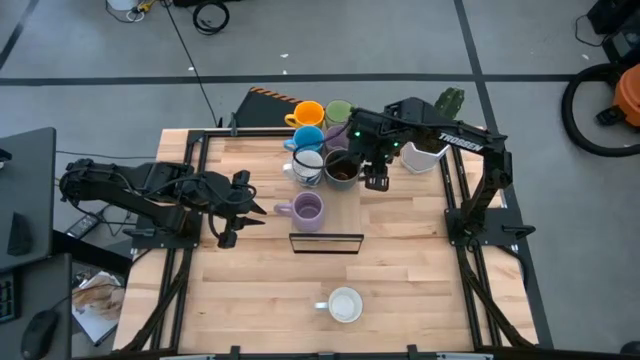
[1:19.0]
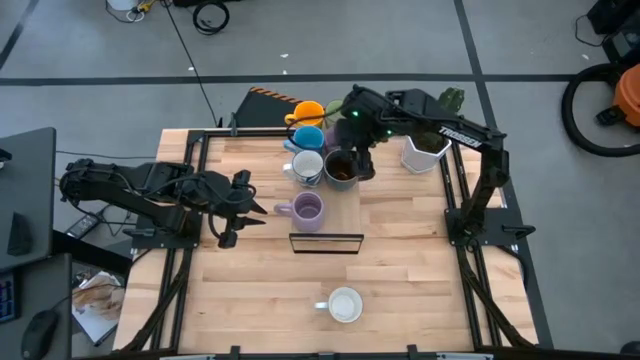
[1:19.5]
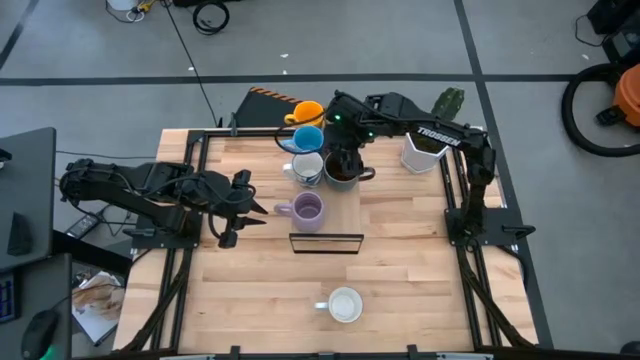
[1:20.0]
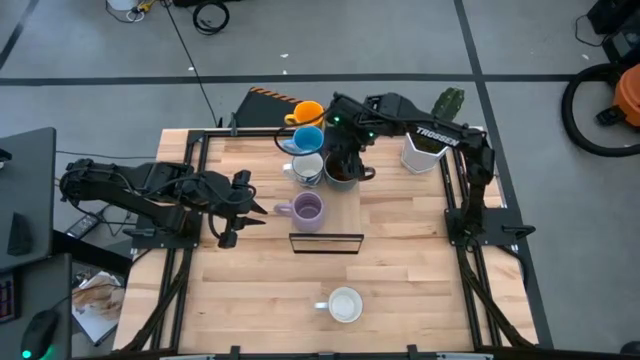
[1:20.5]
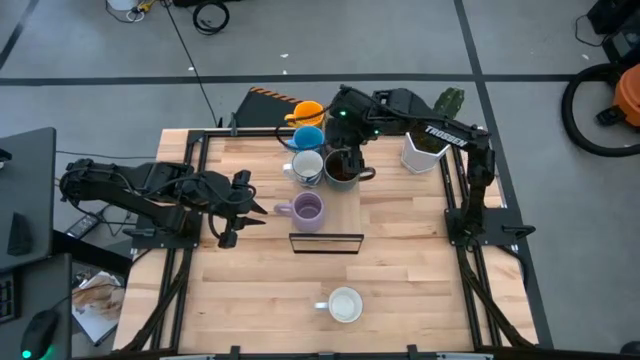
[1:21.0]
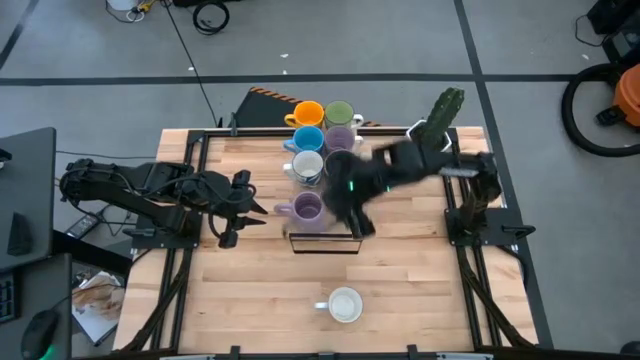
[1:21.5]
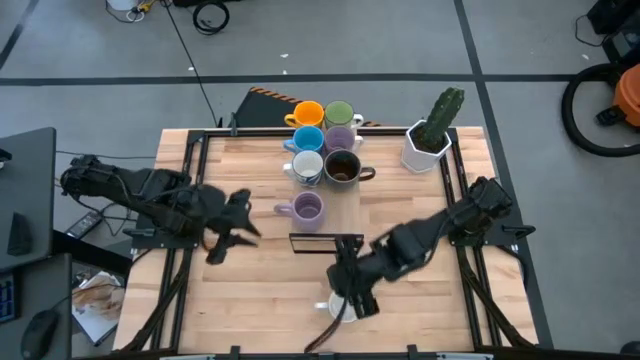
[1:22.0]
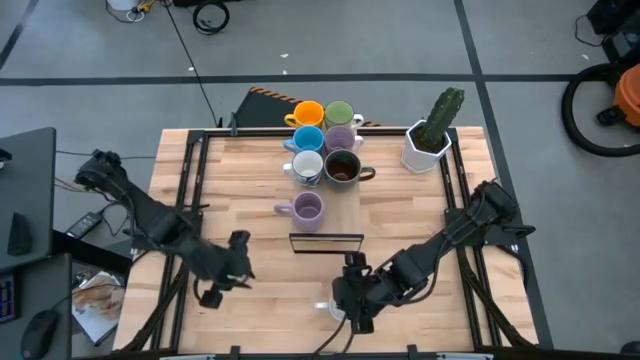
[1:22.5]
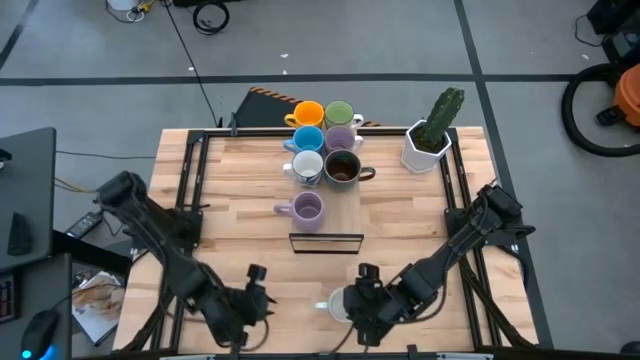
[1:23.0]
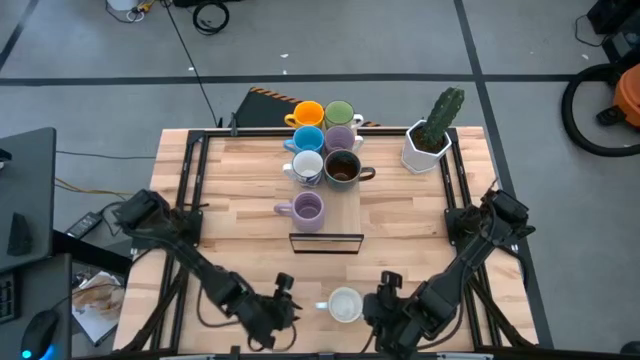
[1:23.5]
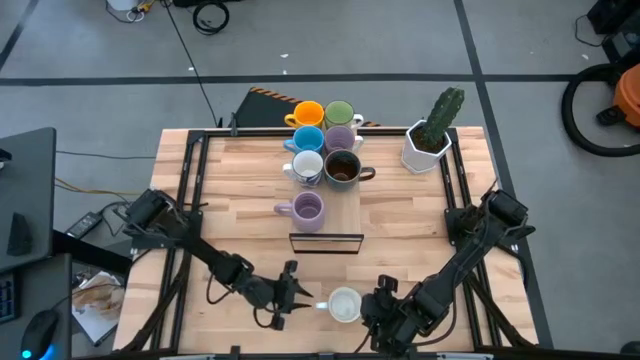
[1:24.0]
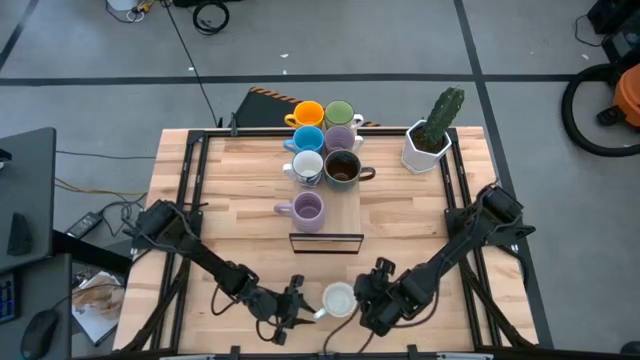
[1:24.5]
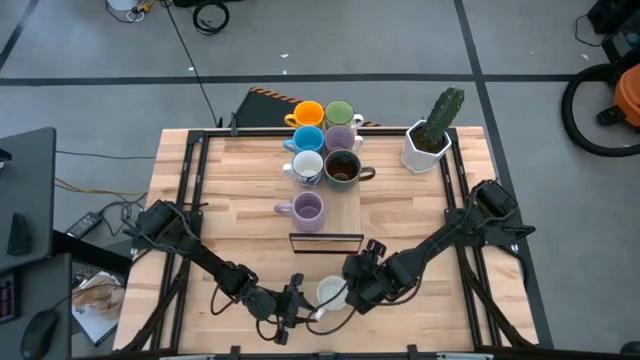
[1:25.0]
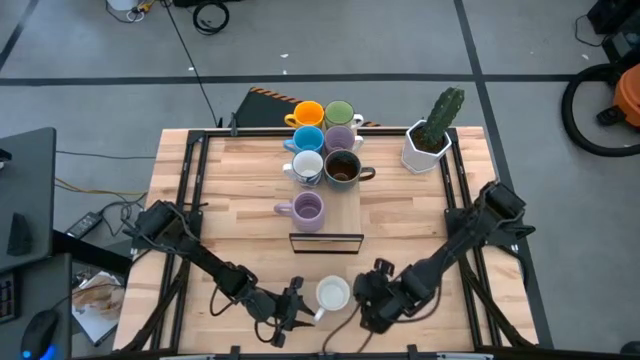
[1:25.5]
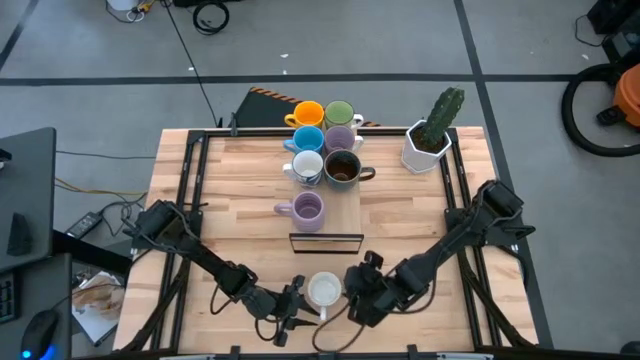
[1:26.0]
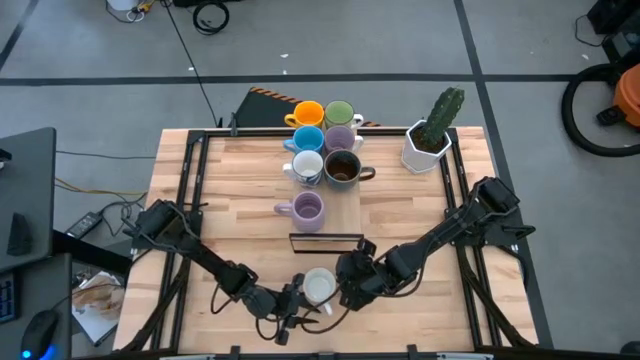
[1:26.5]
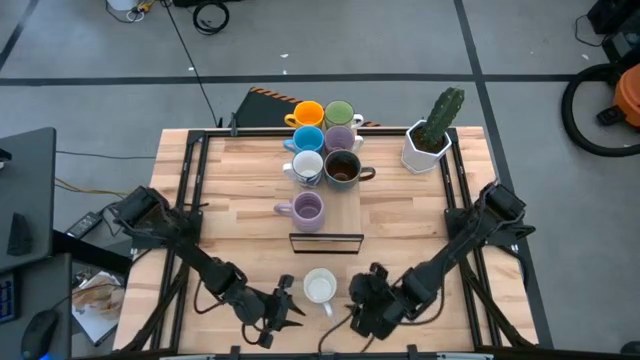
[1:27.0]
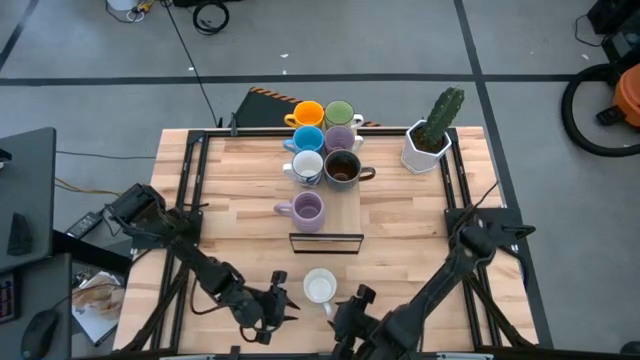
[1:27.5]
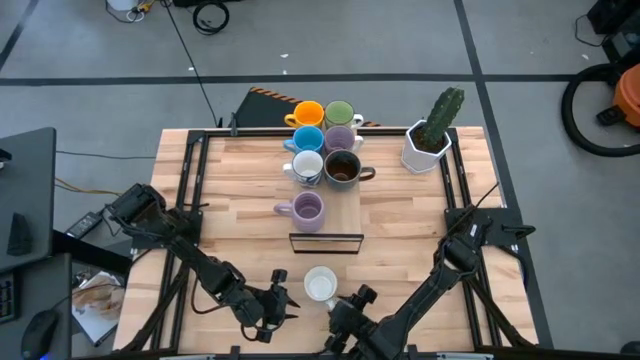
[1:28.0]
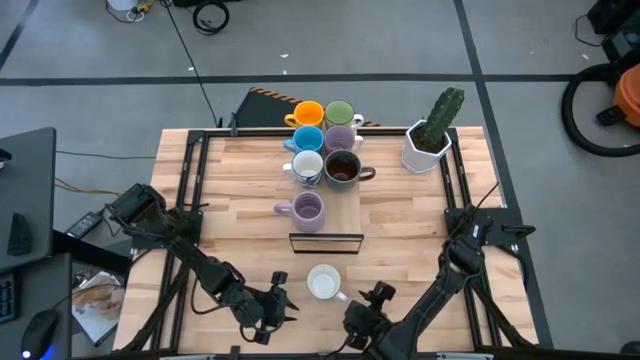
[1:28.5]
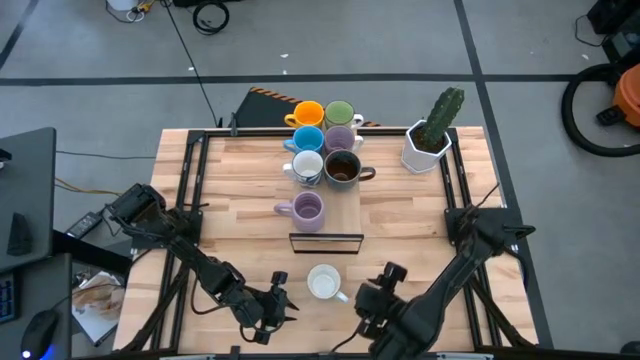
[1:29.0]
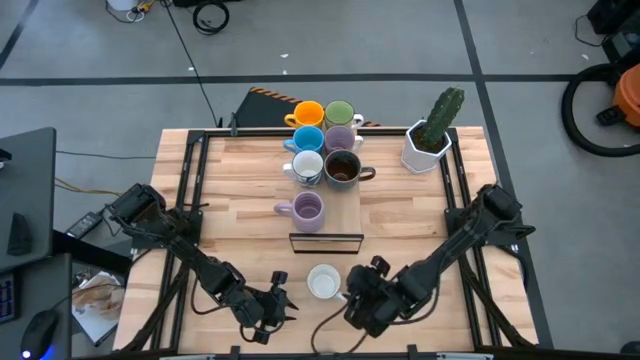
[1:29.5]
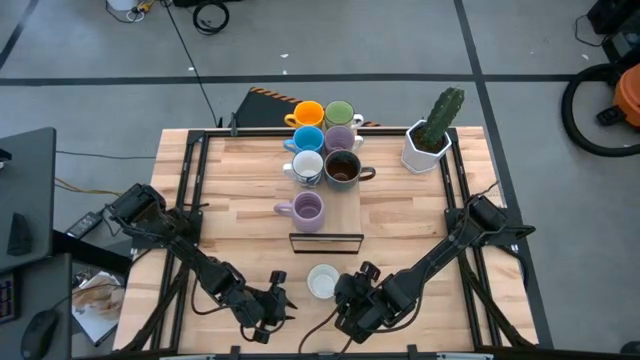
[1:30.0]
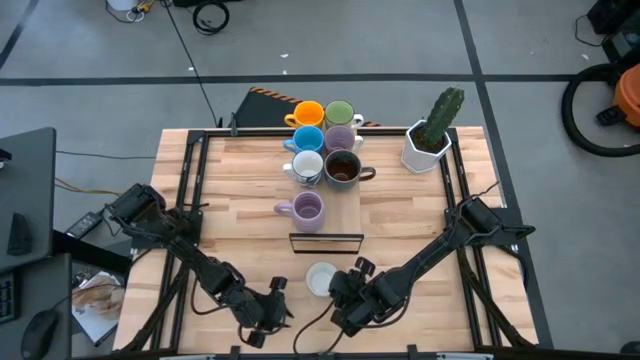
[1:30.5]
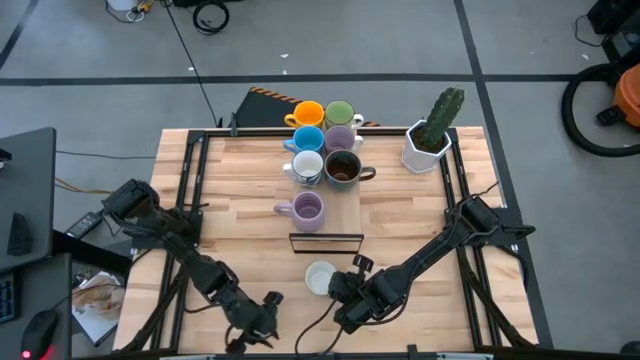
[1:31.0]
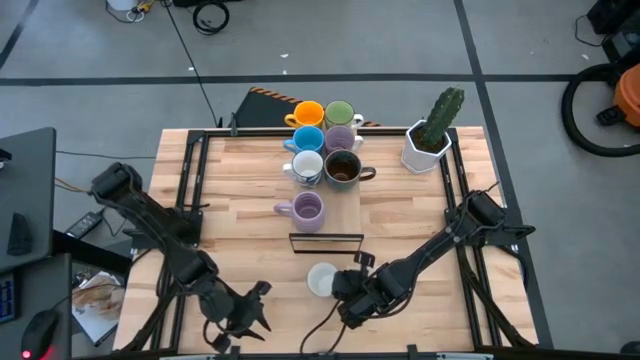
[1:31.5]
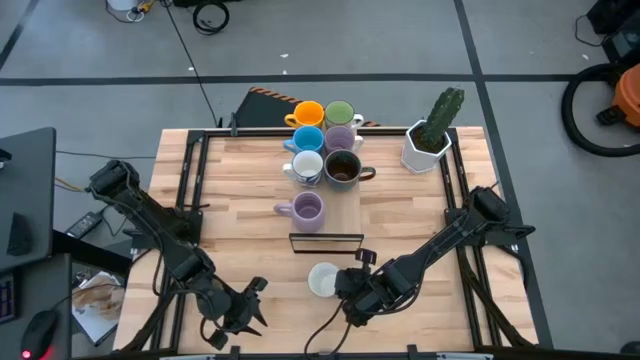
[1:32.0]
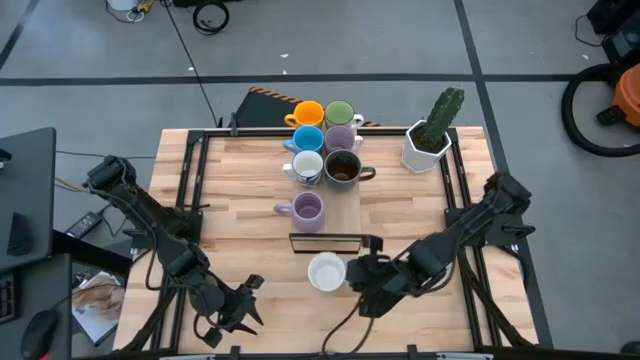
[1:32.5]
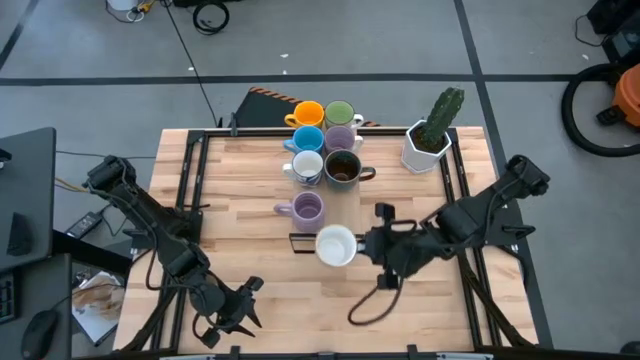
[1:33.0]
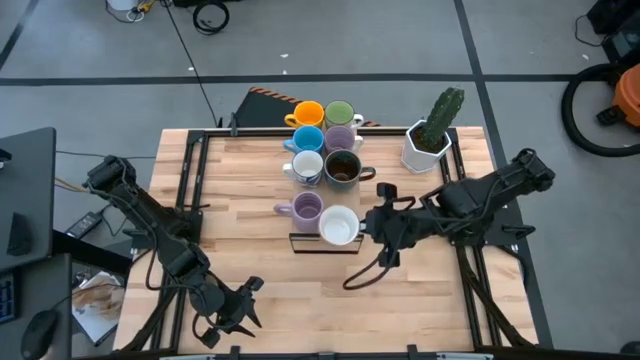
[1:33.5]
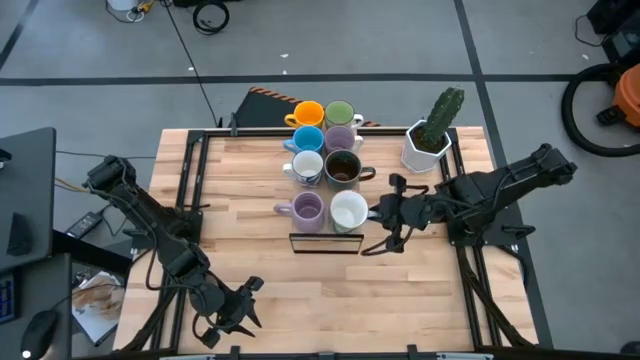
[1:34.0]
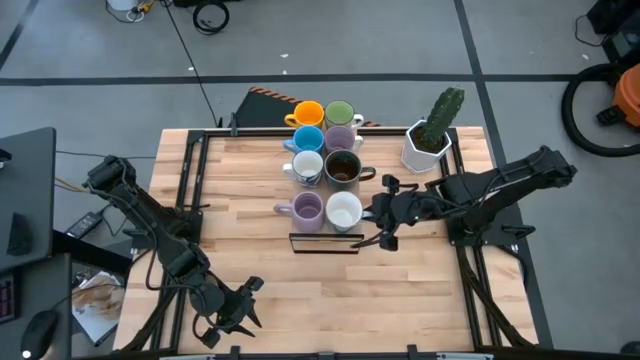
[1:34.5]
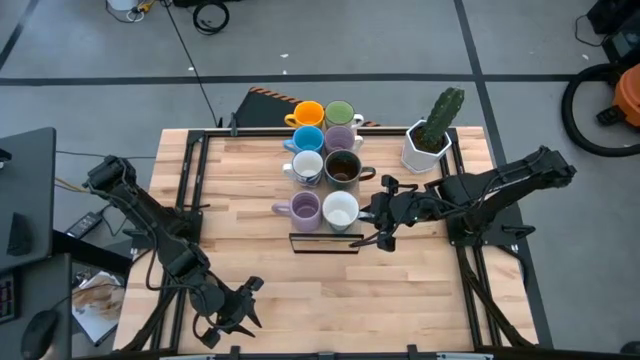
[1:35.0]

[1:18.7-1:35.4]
Task: Place coffee mugs
Put the light blue mug on the shelf

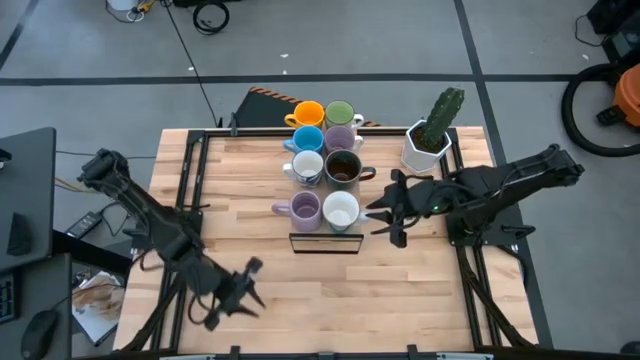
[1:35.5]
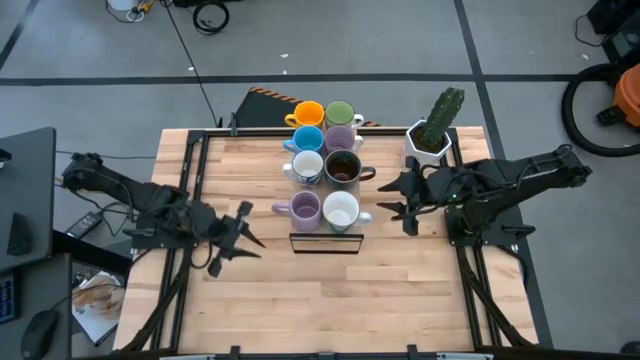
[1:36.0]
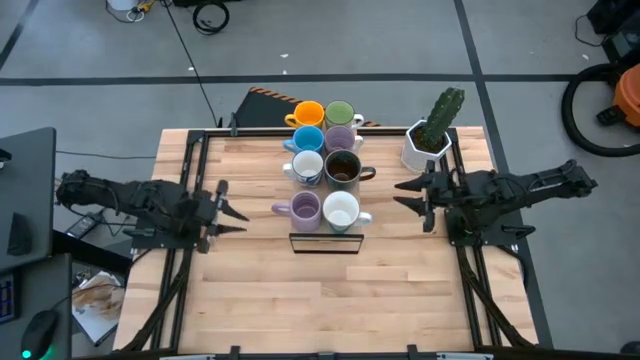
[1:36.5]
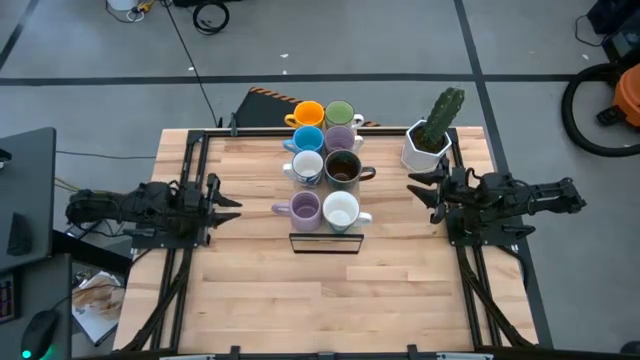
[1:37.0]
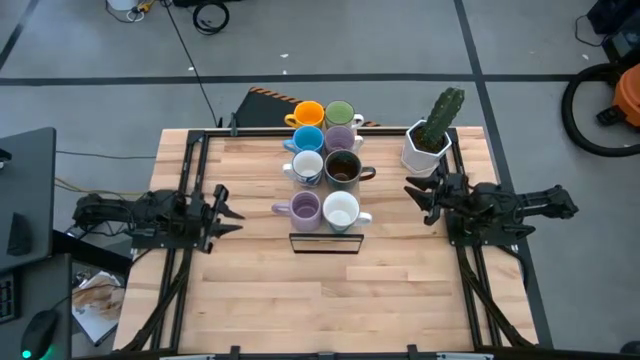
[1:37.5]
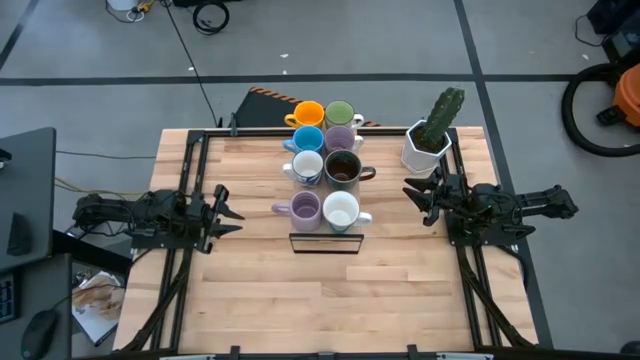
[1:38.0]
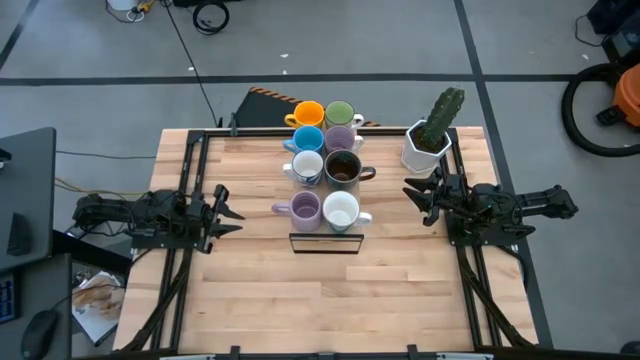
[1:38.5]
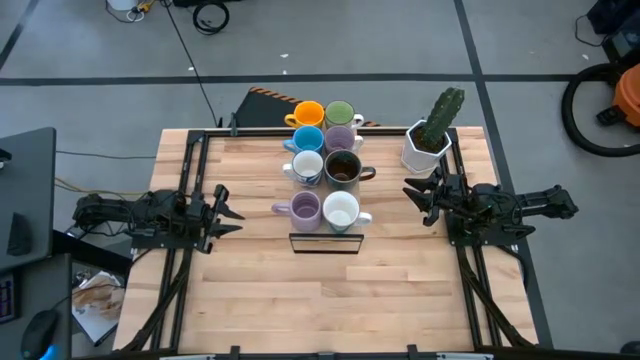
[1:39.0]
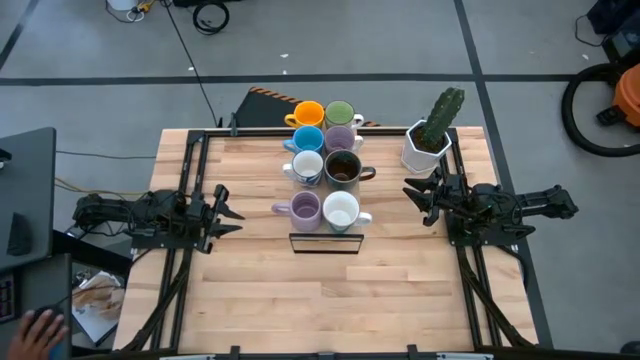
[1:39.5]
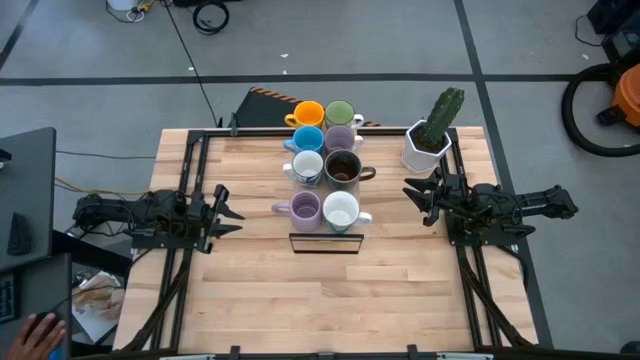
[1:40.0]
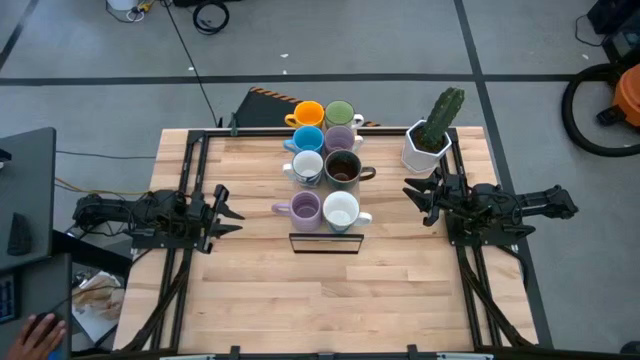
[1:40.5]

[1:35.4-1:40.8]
Return to Home Position
